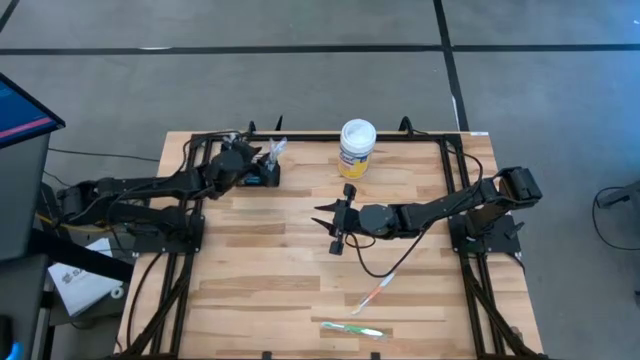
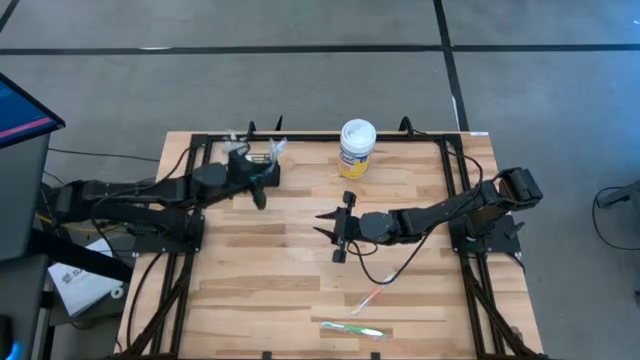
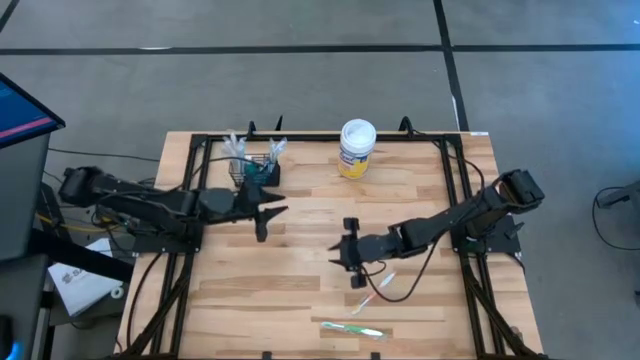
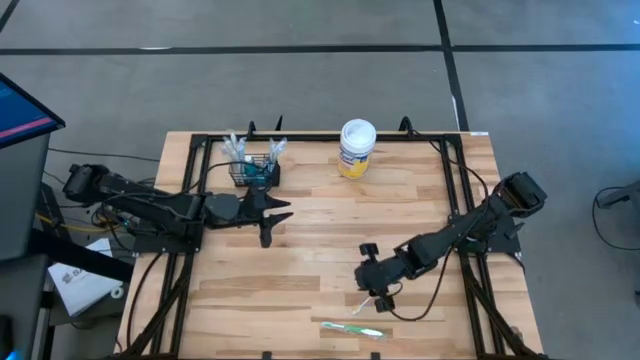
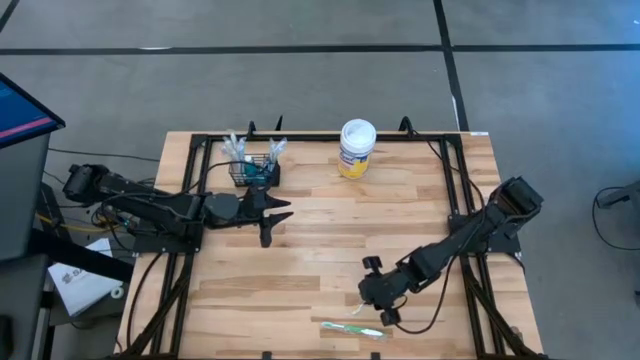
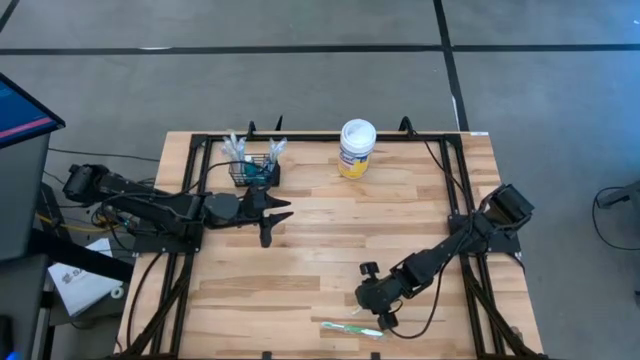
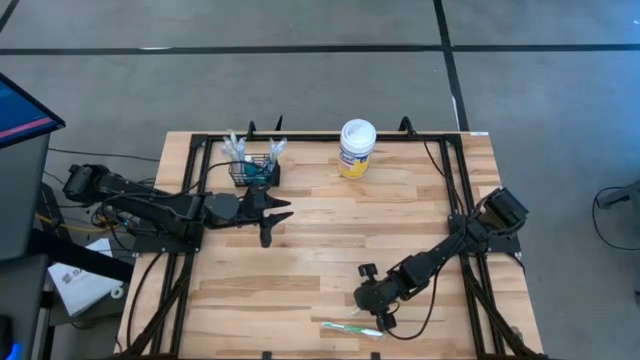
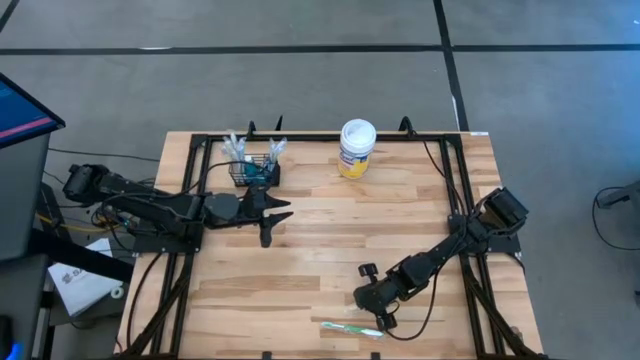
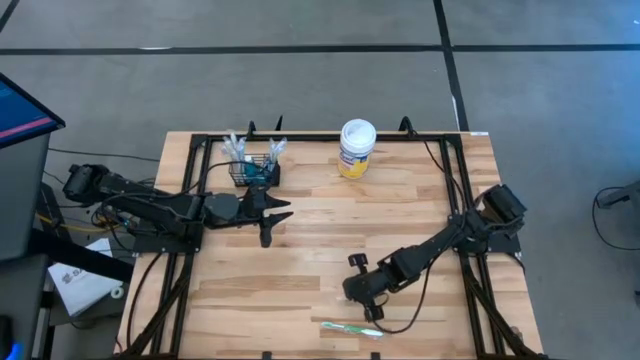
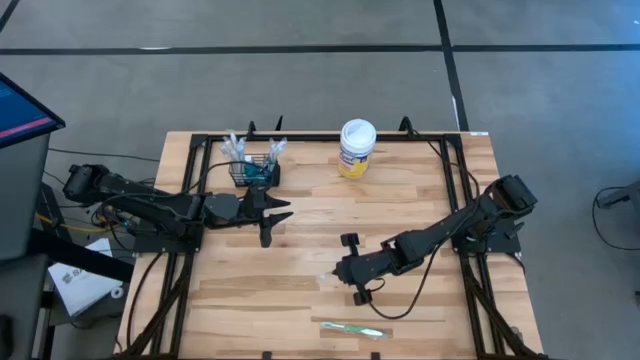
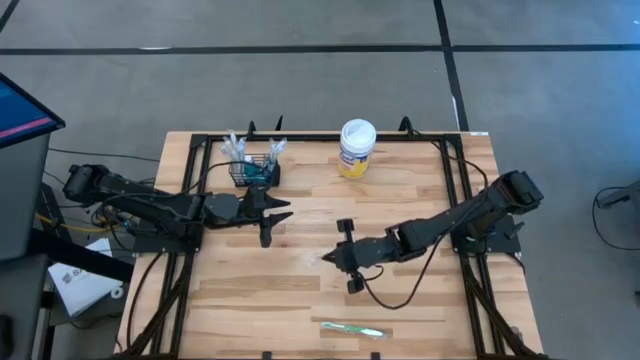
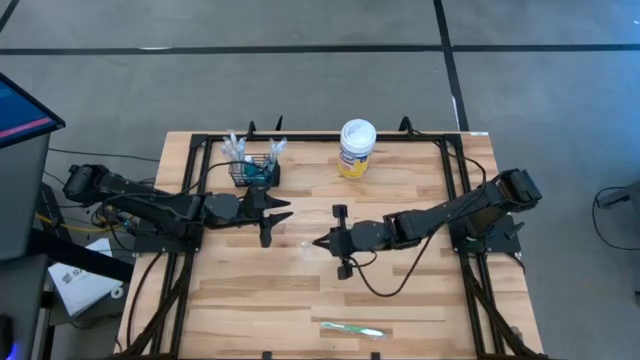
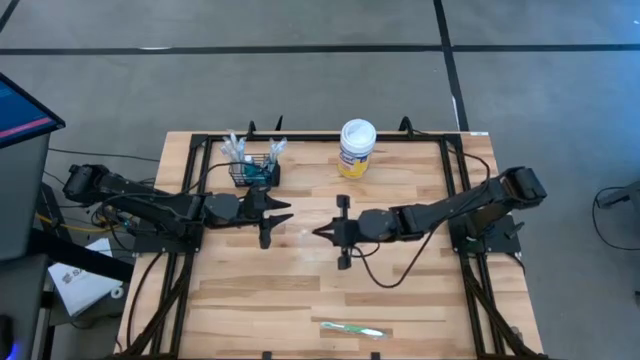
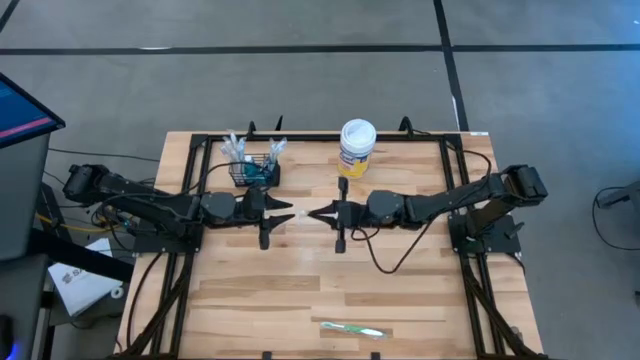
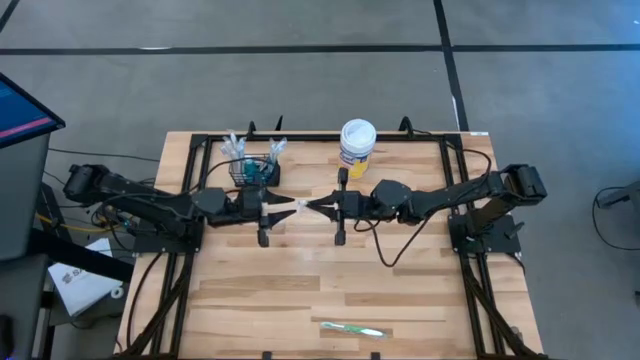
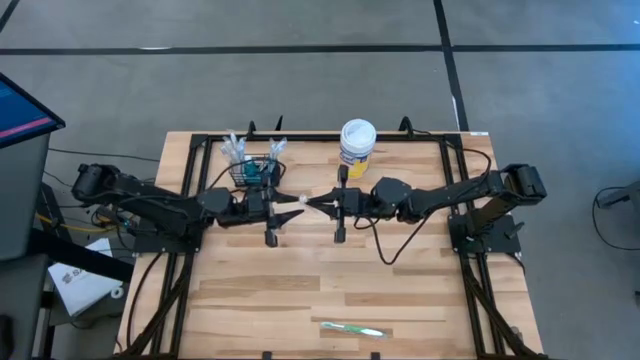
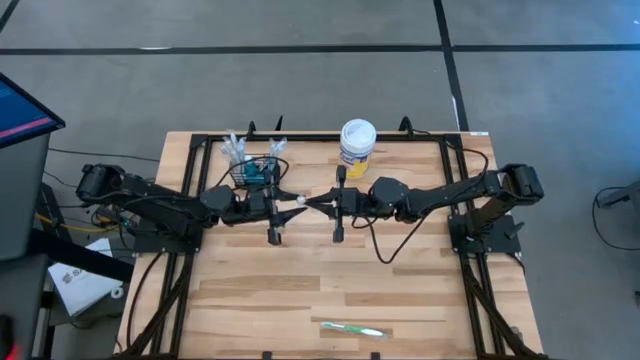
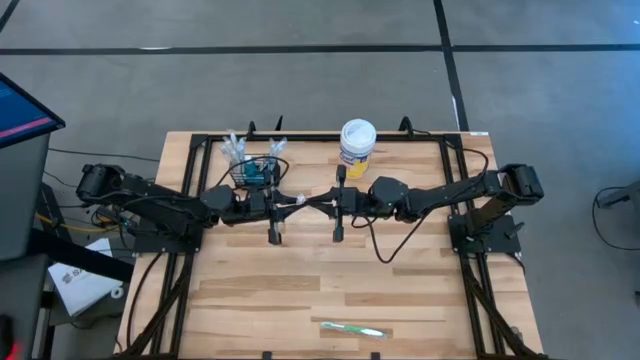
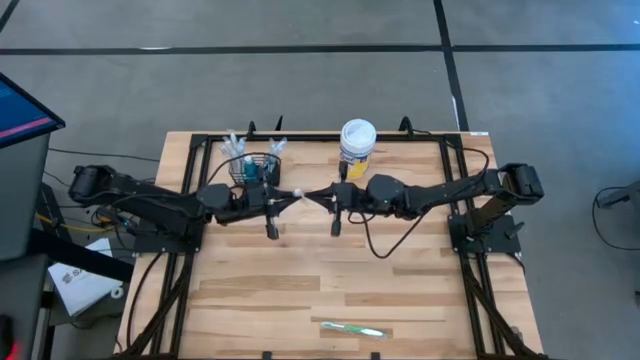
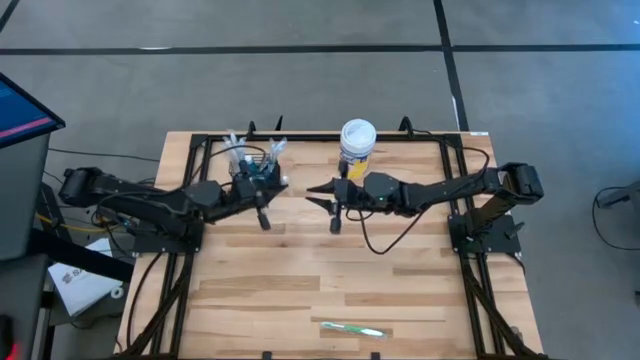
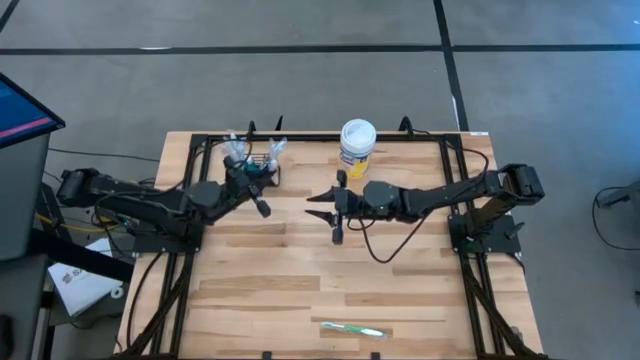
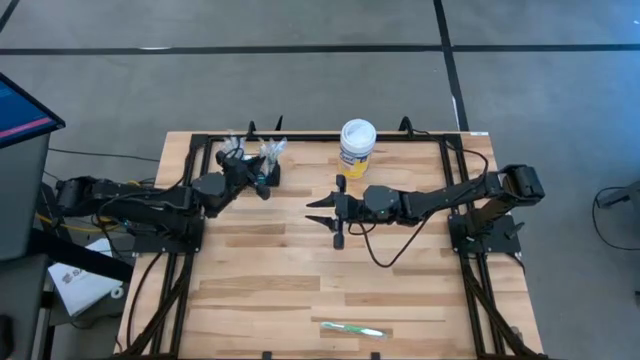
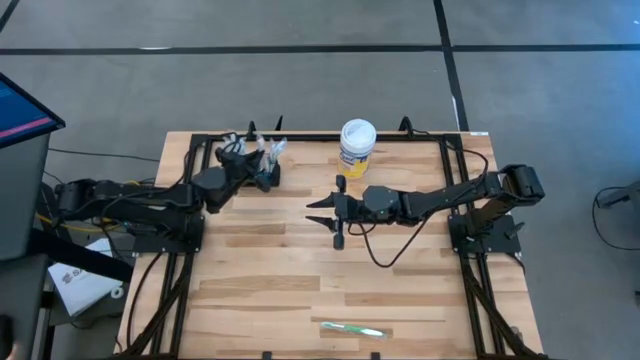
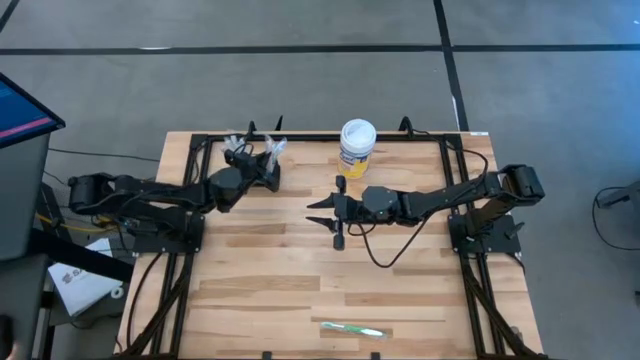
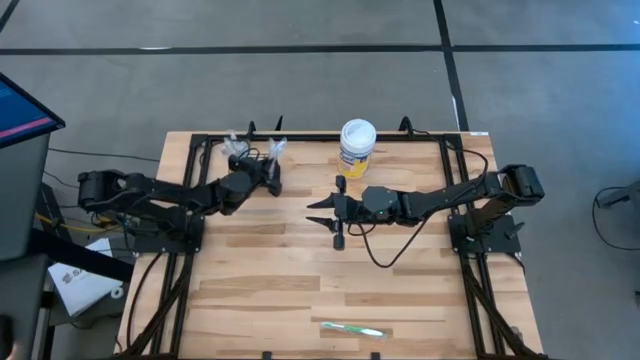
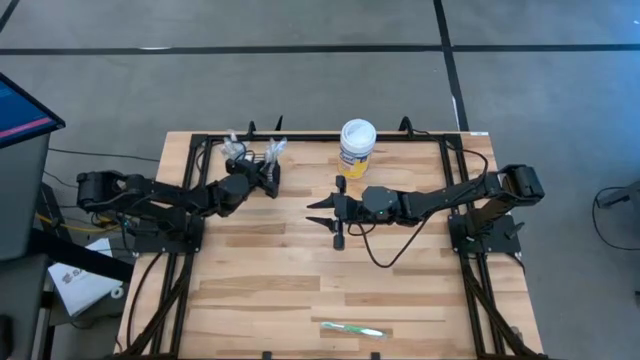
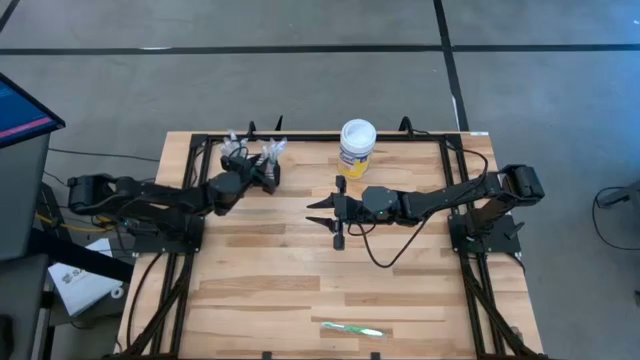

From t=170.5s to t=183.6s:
Task: Pick & Place toothbrushing station
Put the orange toothbrush into the mesh organizer

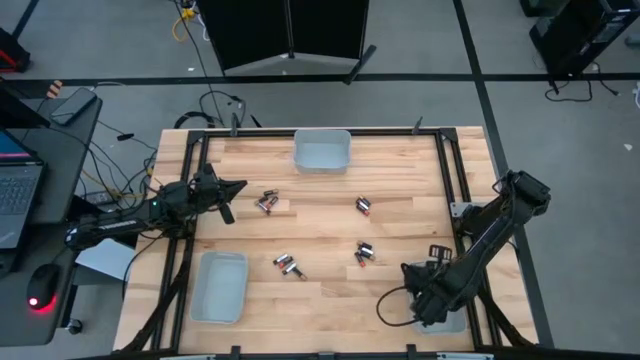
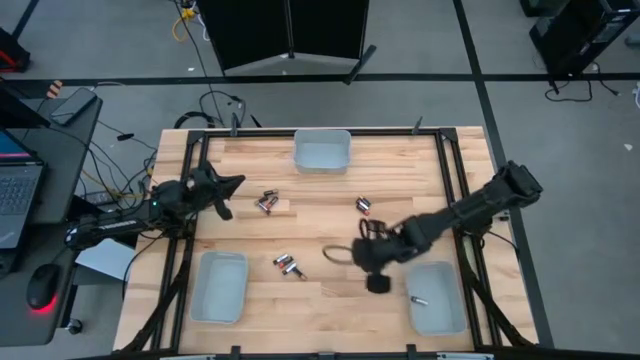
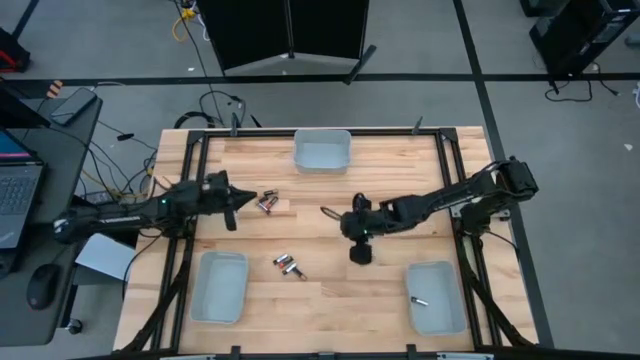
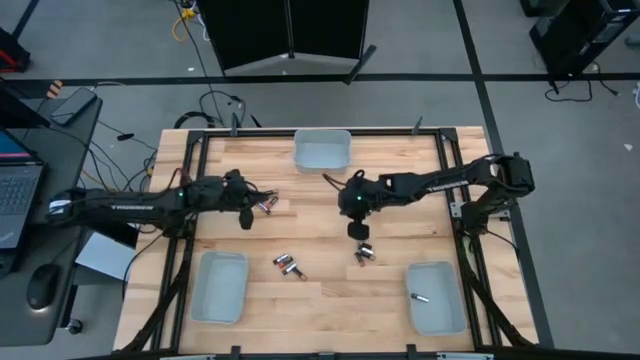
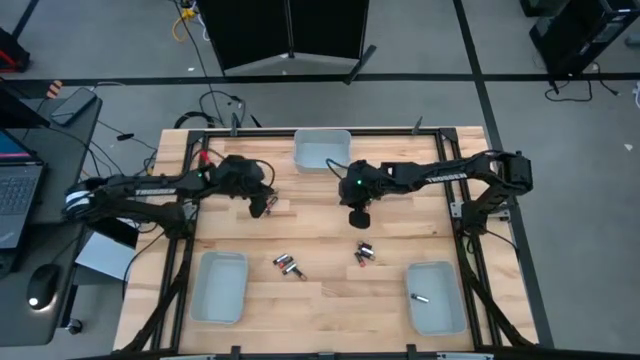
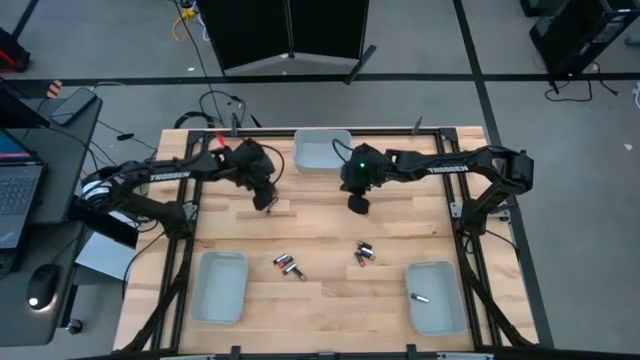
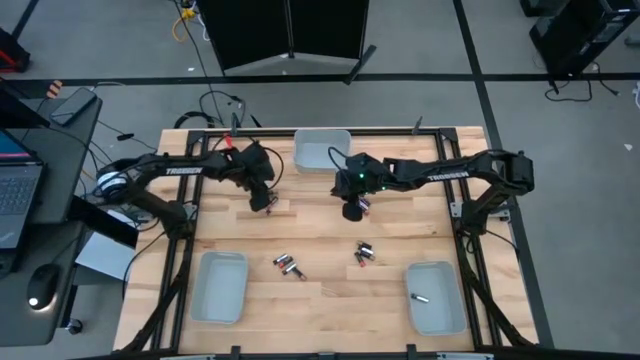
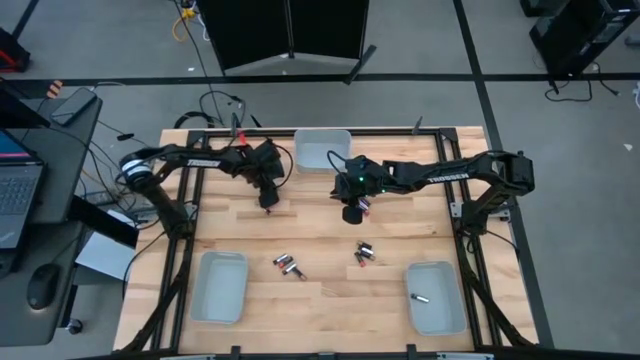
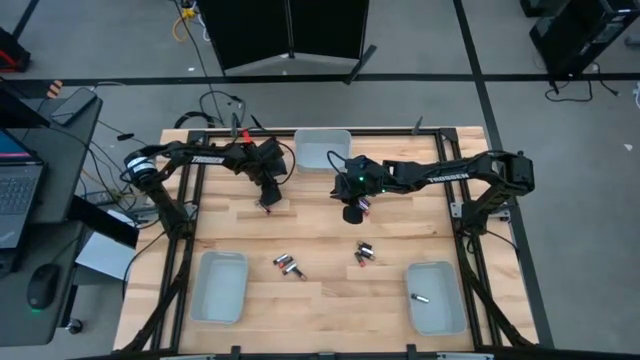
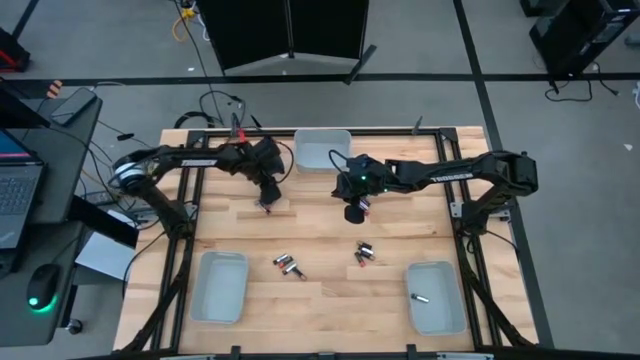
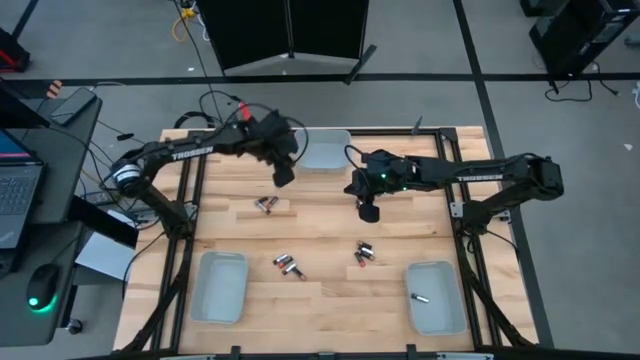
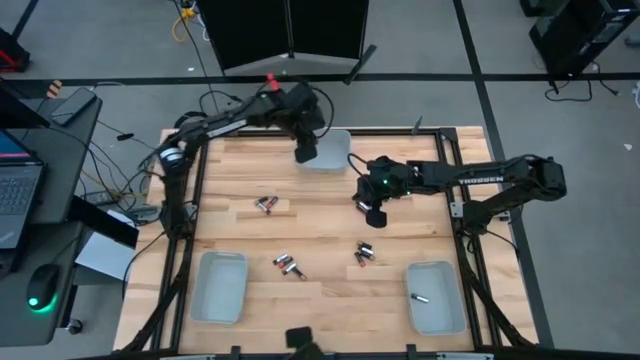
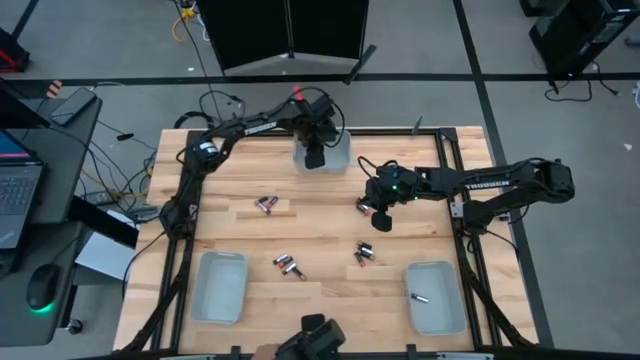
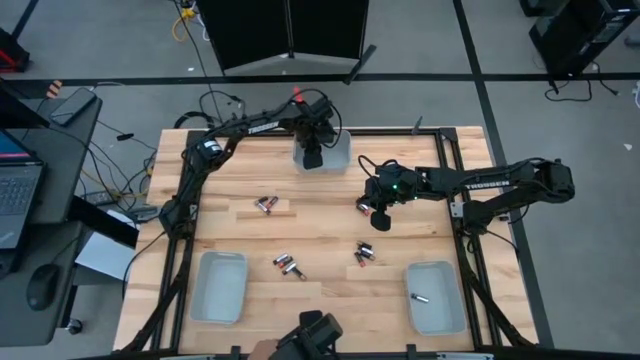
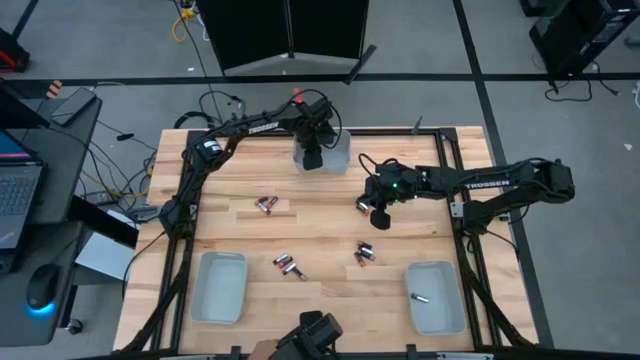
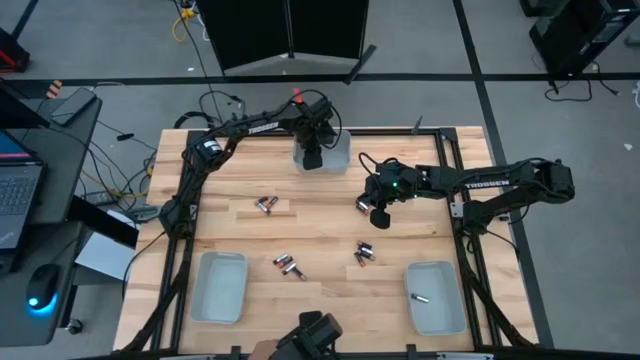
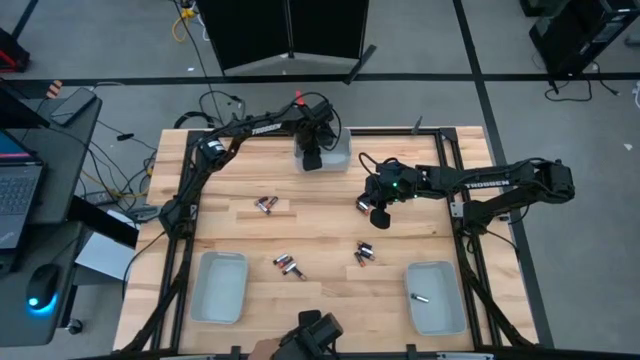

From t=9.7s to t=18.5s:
Task: Sort batteries
Put the copper battery into the top gray bin
